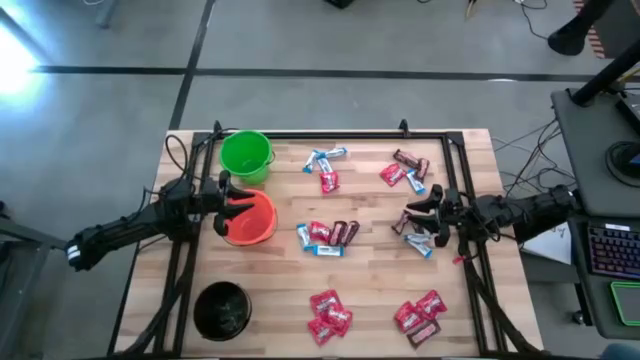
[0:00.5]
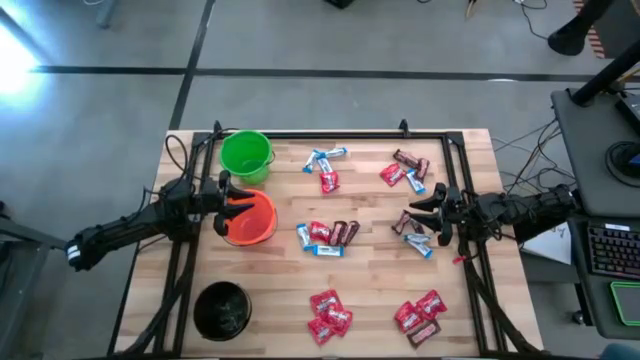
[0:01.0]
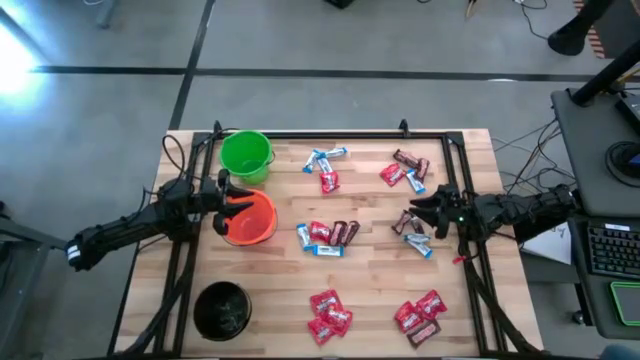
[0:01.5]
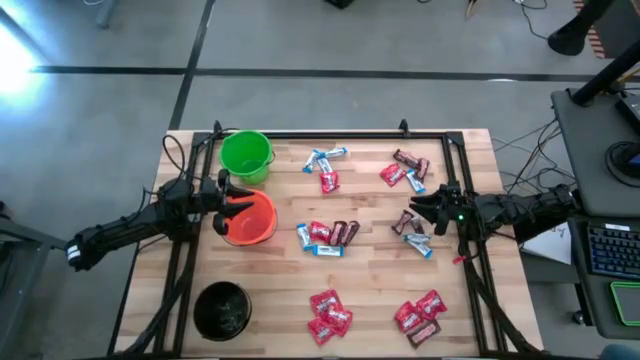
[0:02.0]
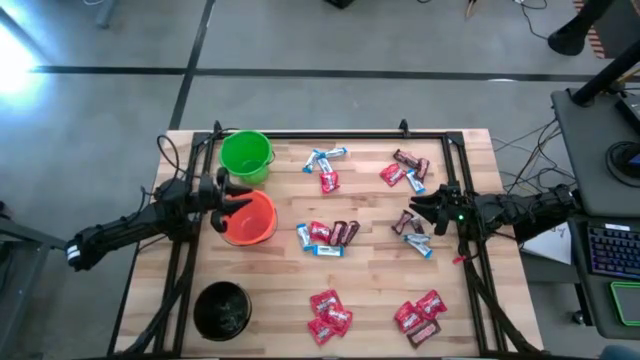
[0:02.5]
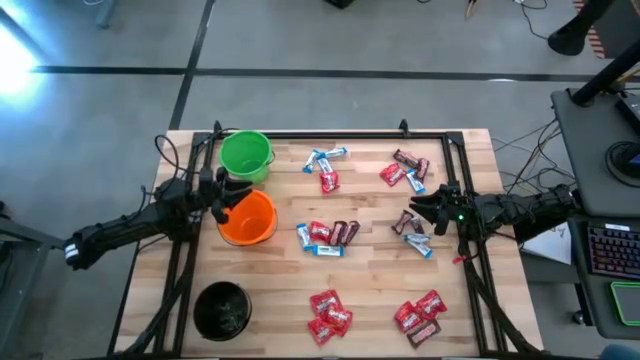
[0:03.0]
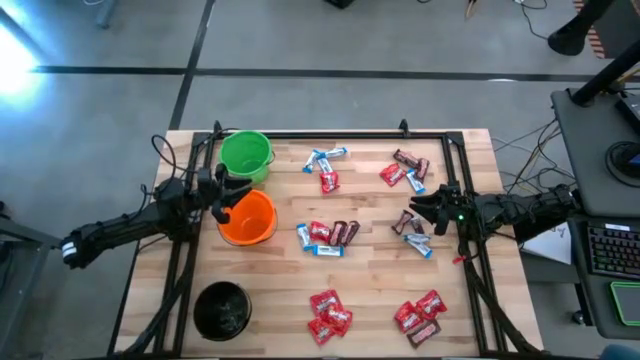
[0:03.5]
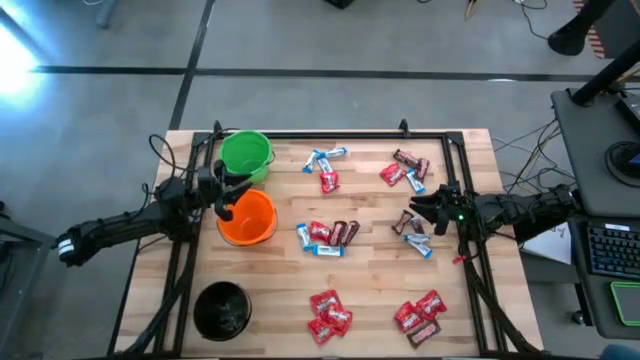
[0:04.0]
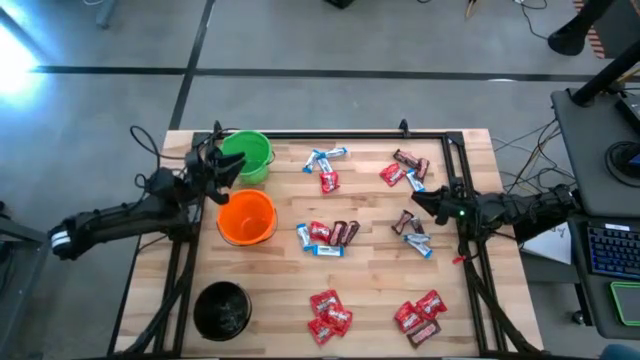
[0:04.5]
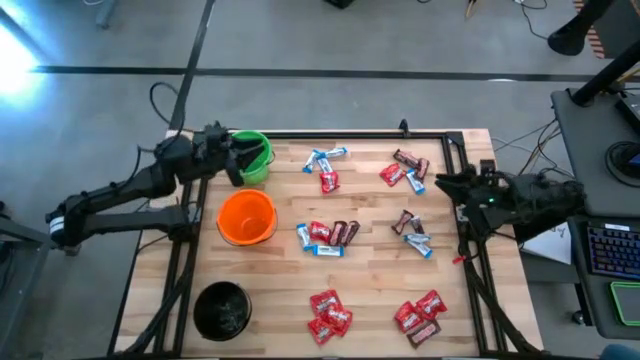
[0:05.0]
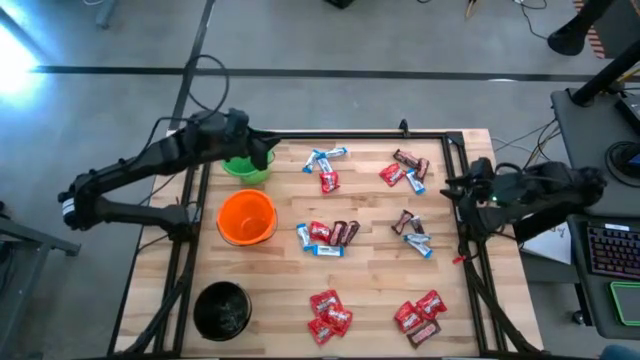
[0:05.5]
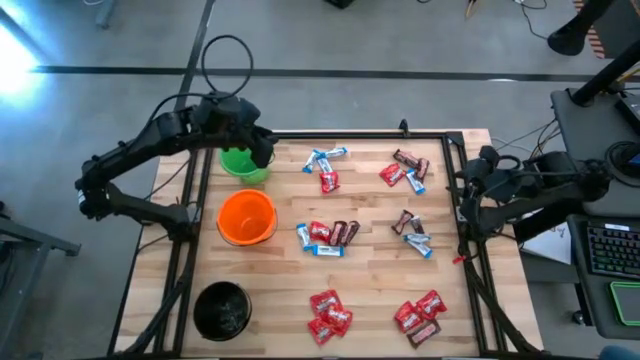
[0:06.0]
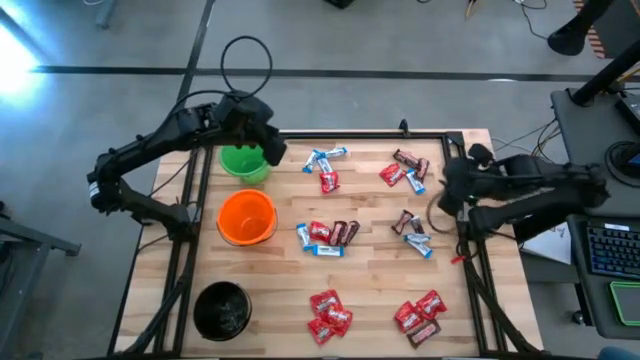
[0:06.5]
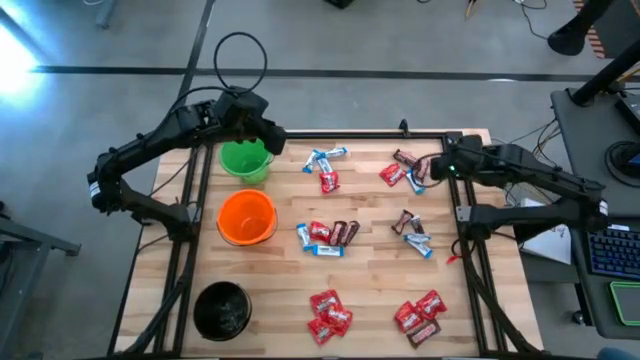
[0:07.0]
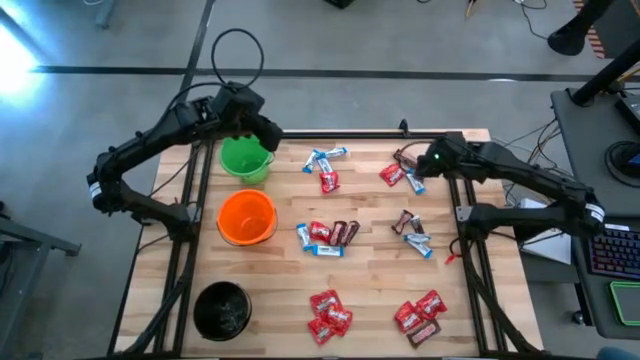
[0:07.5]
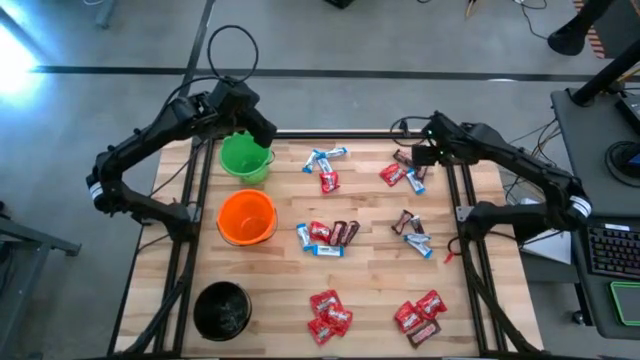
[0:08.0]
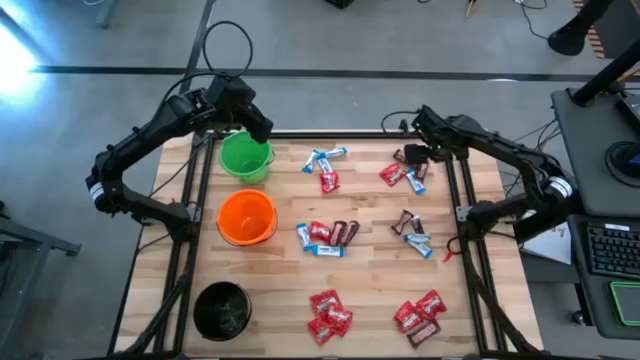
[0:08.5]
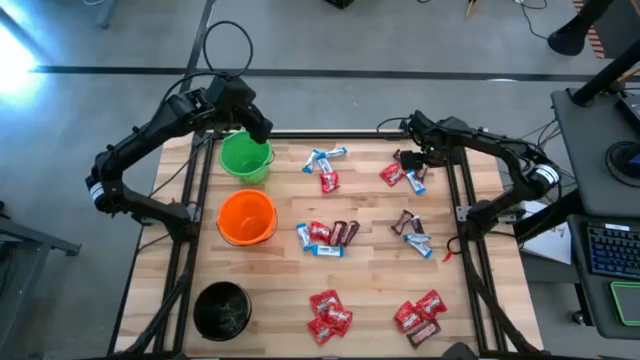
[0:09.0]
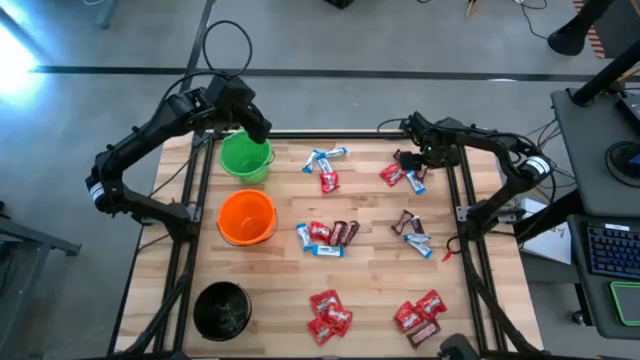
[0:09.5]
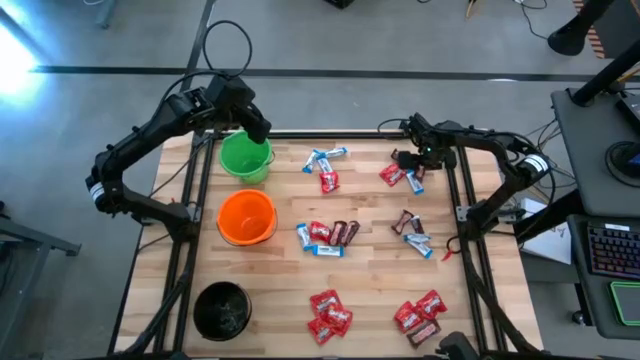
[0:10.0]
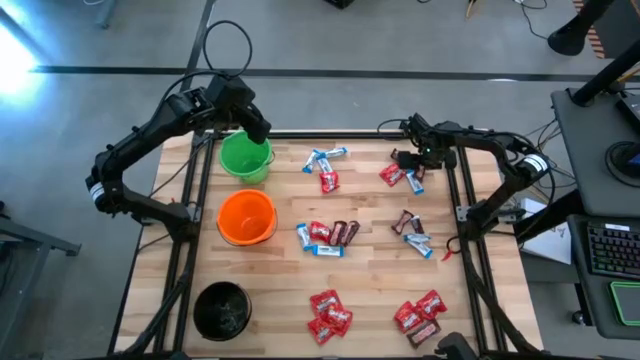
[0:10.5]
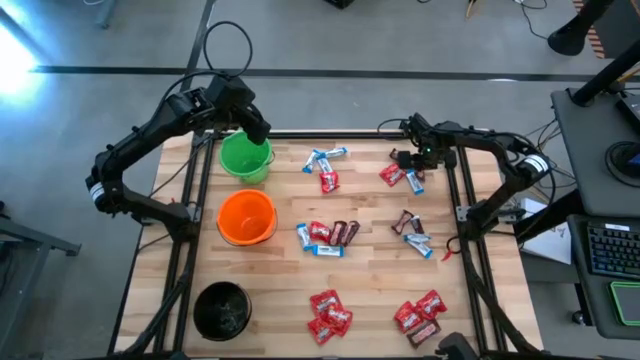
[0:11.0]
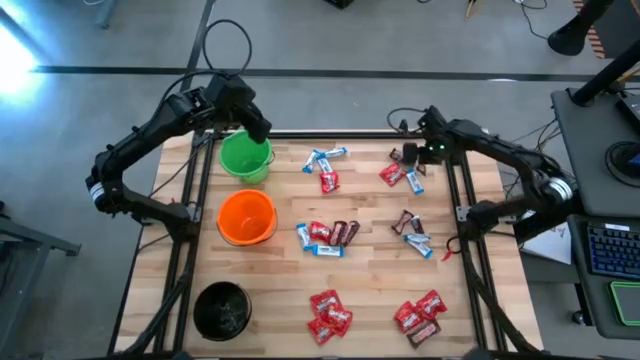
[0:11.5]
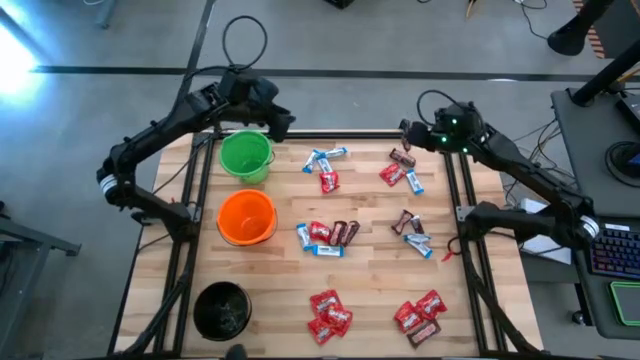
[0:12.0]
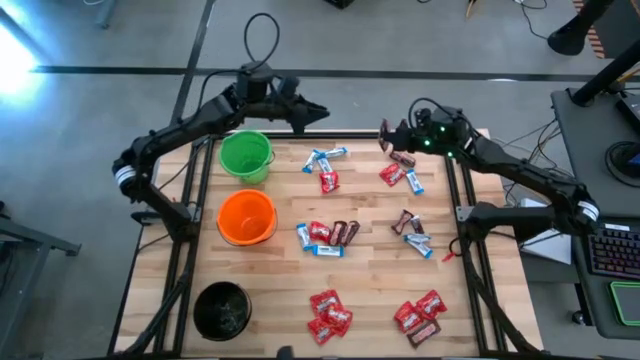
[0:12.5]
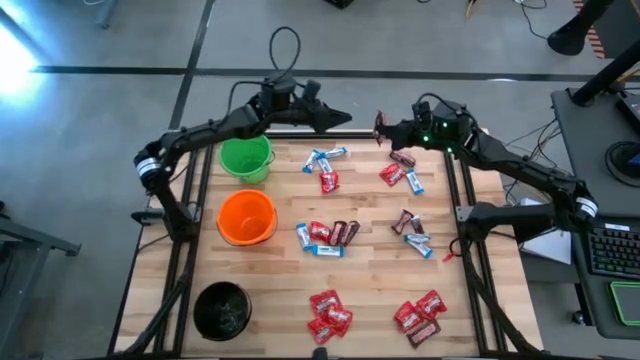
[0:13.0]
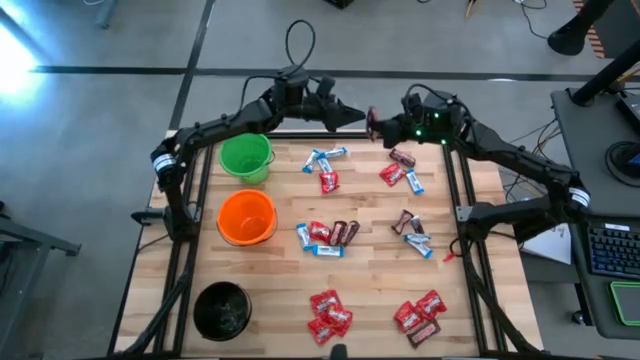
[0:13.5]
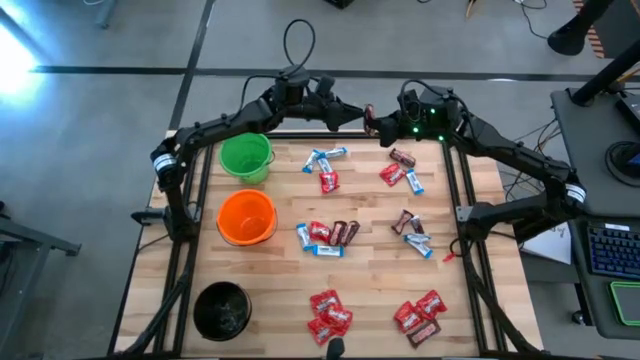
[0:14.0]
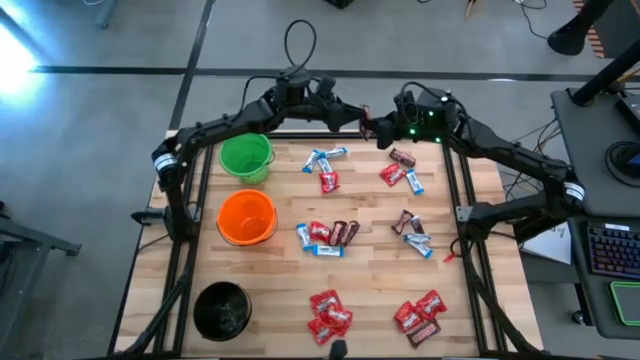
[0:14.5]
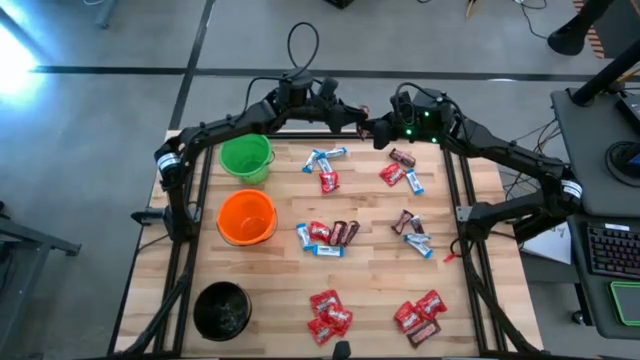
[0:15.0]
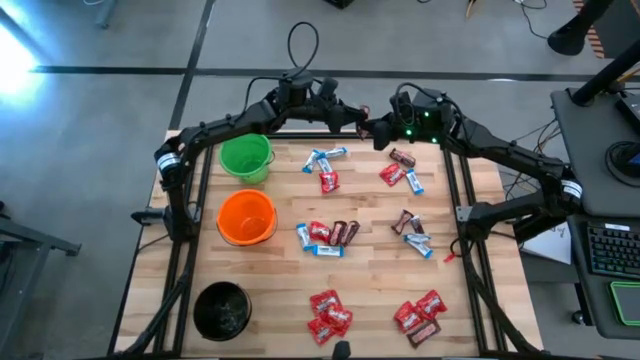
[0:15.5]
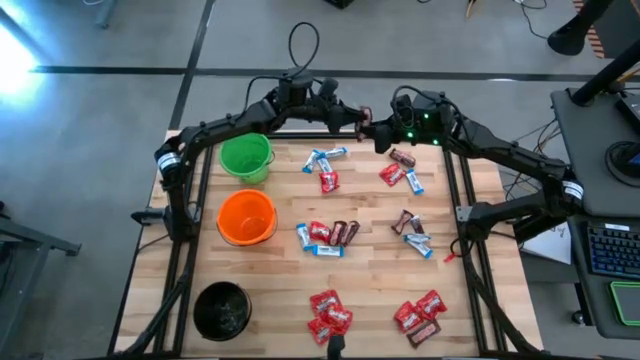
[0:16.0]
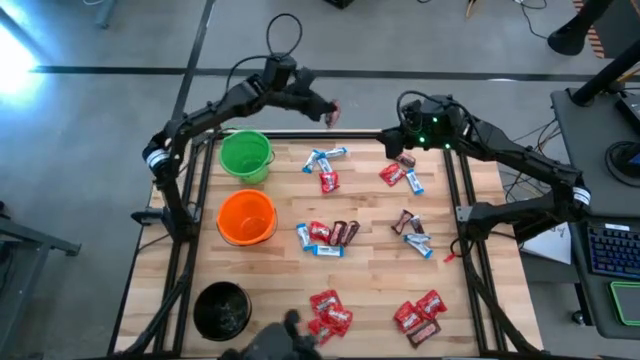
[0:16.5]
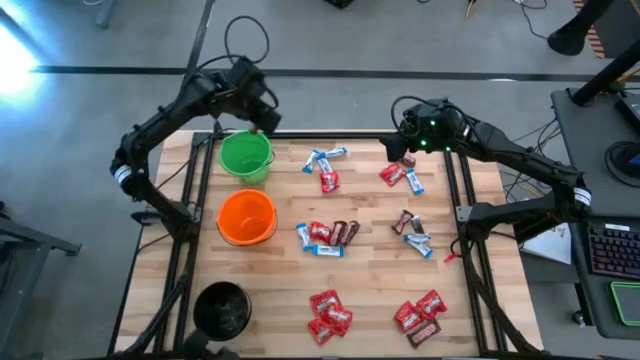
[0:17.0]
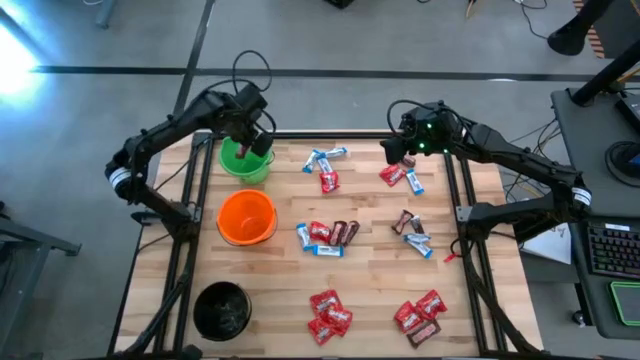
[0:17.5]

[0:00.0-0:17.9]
Task: Organize candy in baskets
Put the brown chocolate into the green bucket
